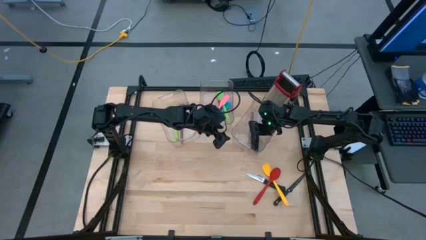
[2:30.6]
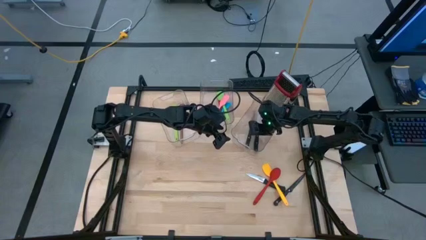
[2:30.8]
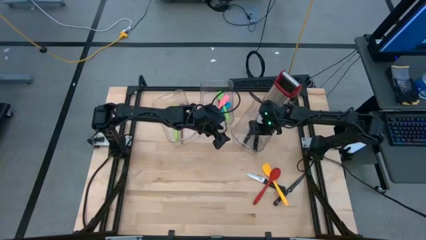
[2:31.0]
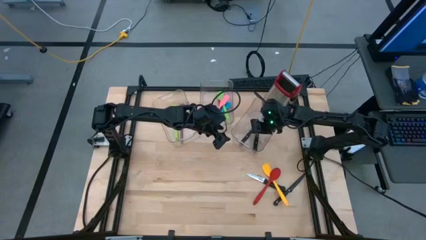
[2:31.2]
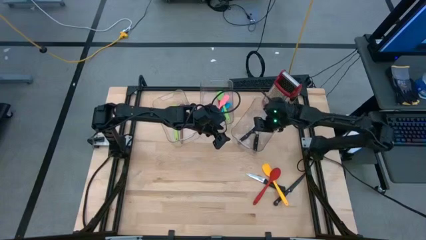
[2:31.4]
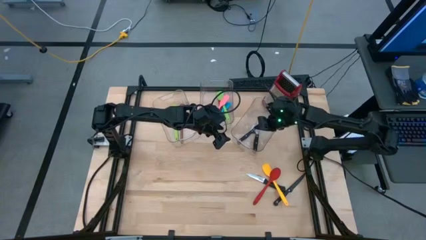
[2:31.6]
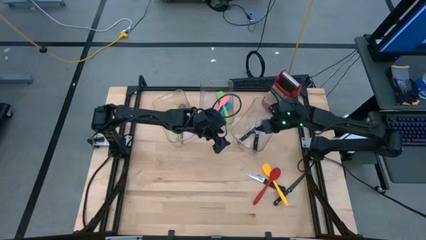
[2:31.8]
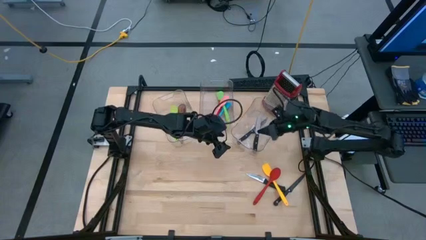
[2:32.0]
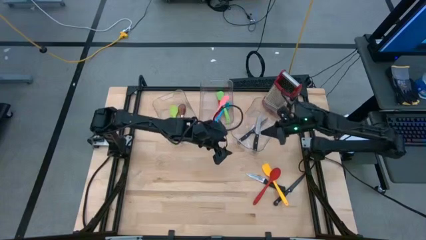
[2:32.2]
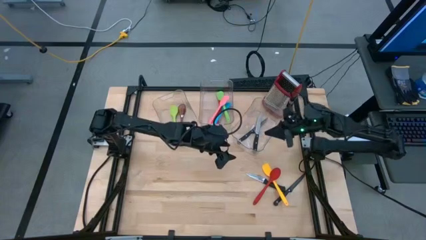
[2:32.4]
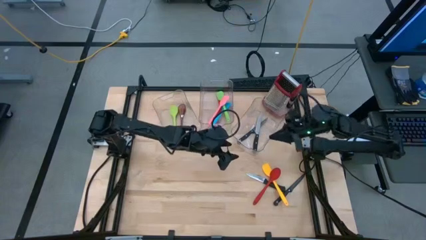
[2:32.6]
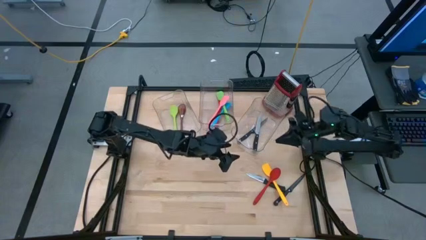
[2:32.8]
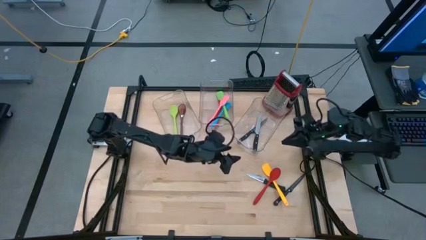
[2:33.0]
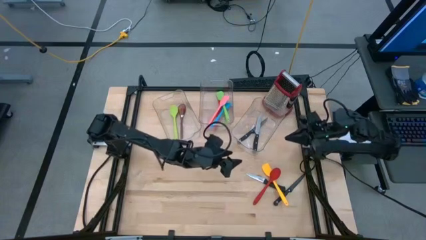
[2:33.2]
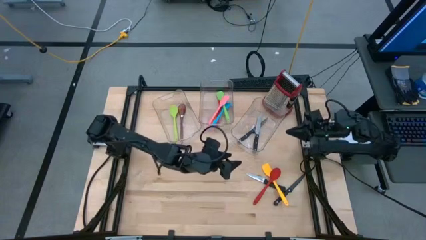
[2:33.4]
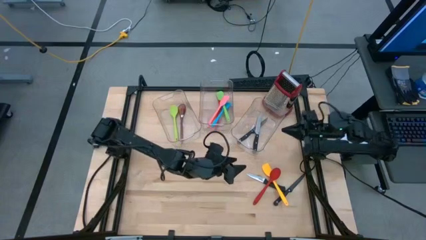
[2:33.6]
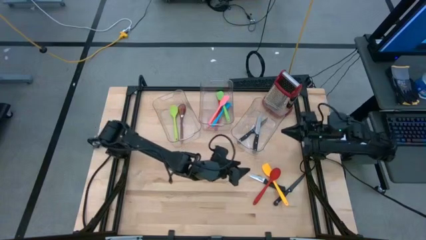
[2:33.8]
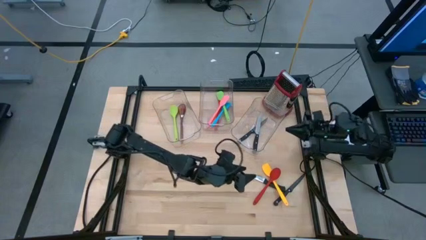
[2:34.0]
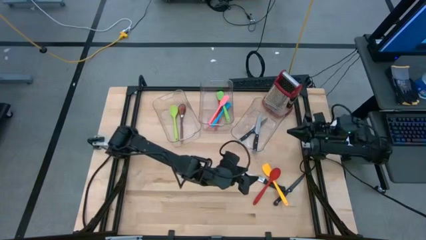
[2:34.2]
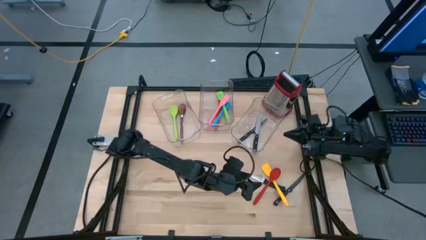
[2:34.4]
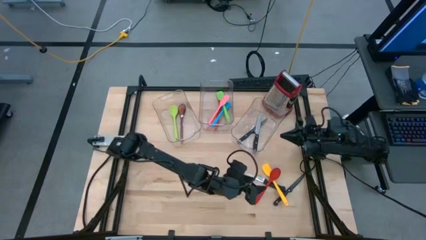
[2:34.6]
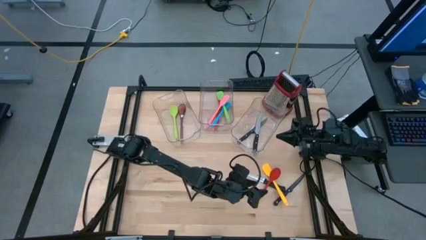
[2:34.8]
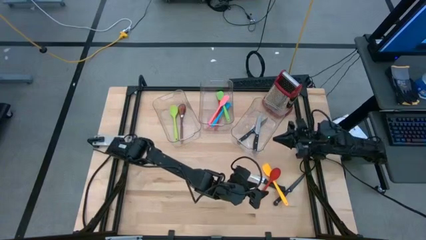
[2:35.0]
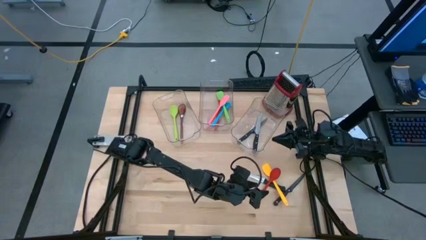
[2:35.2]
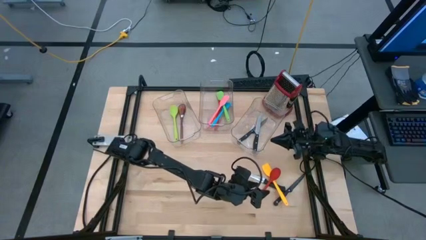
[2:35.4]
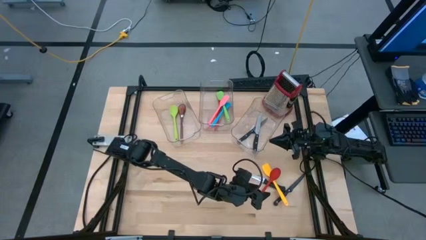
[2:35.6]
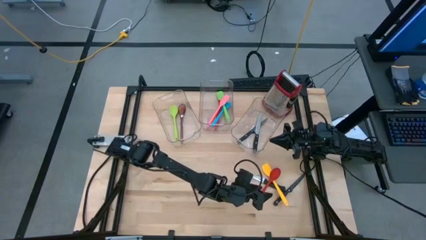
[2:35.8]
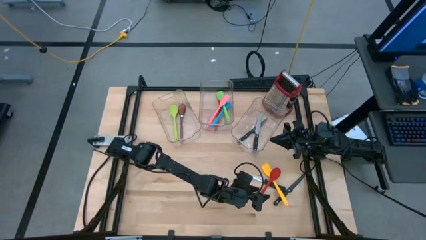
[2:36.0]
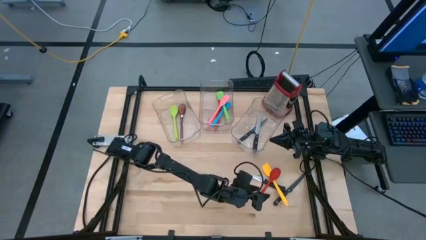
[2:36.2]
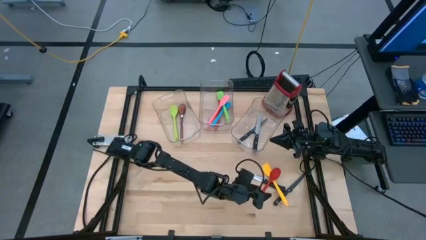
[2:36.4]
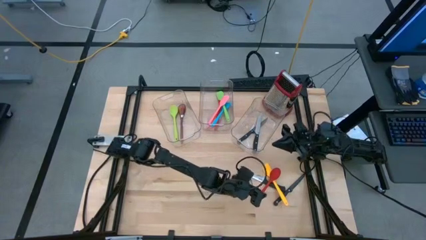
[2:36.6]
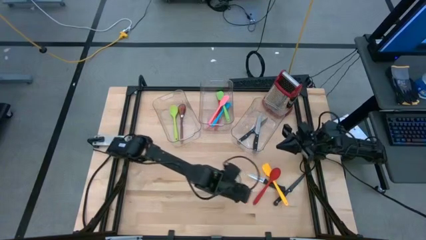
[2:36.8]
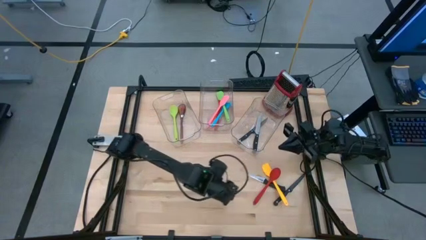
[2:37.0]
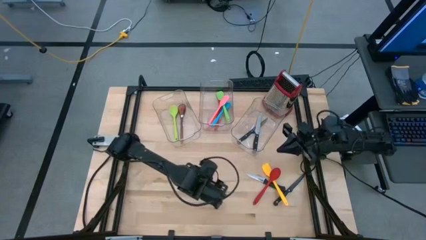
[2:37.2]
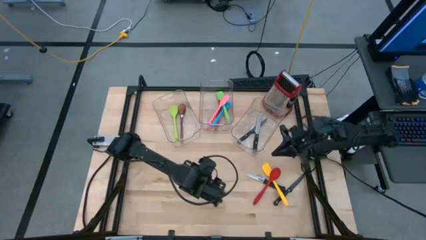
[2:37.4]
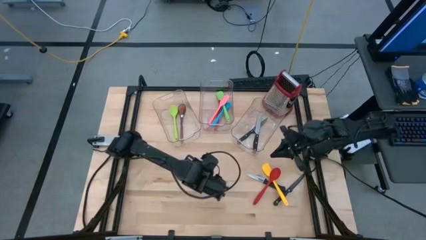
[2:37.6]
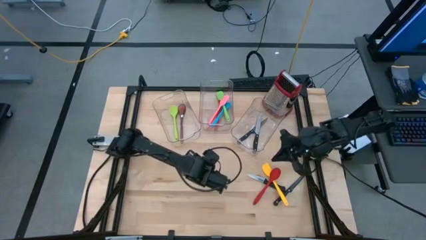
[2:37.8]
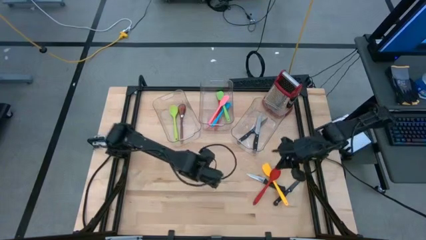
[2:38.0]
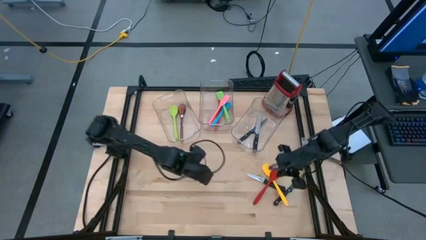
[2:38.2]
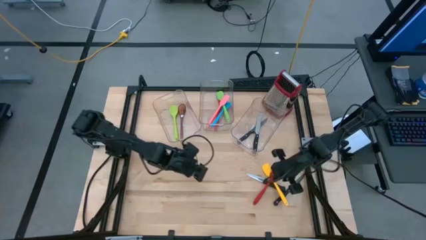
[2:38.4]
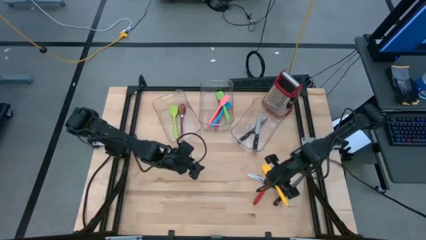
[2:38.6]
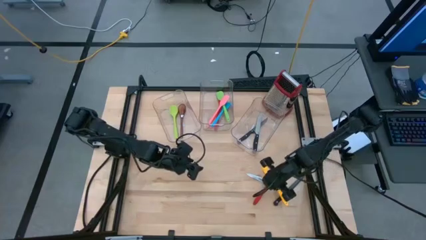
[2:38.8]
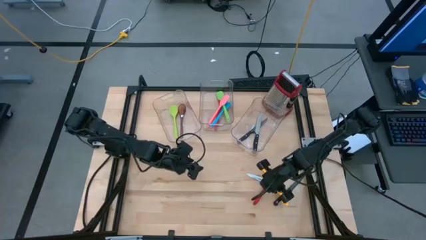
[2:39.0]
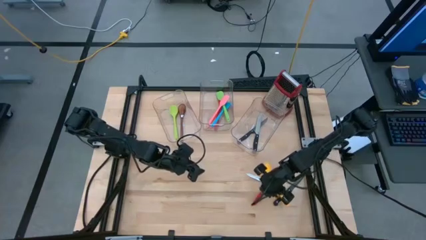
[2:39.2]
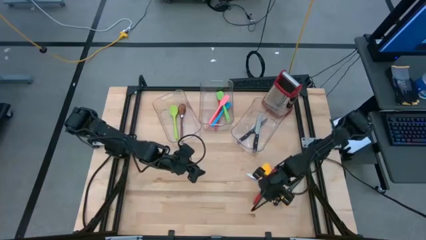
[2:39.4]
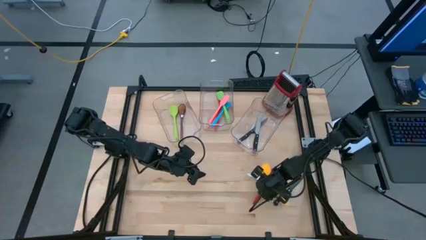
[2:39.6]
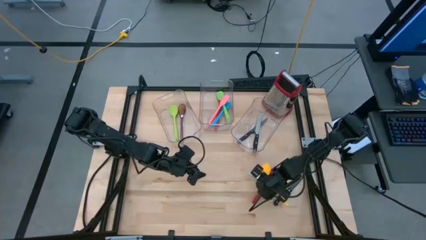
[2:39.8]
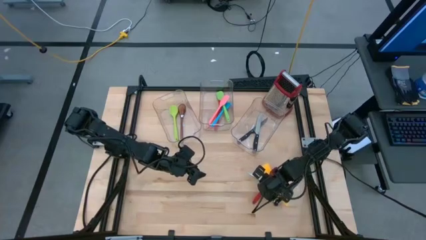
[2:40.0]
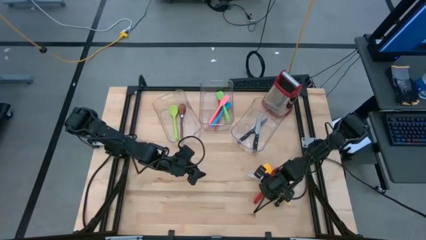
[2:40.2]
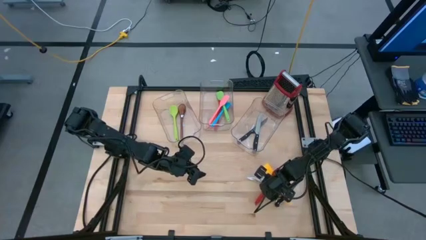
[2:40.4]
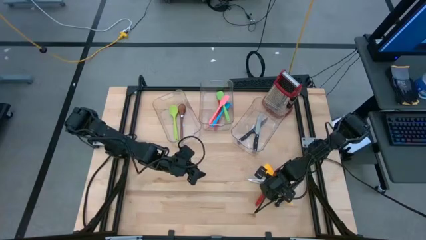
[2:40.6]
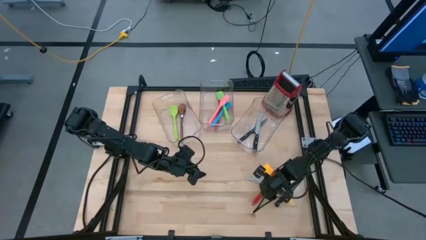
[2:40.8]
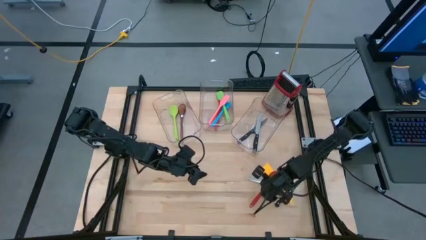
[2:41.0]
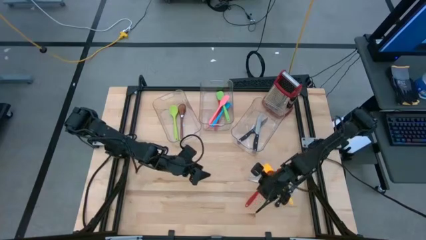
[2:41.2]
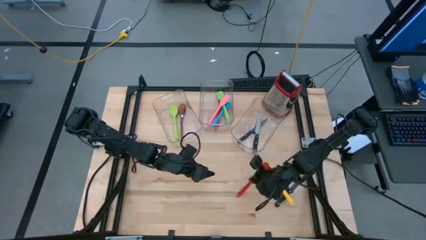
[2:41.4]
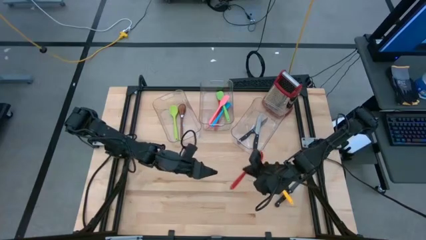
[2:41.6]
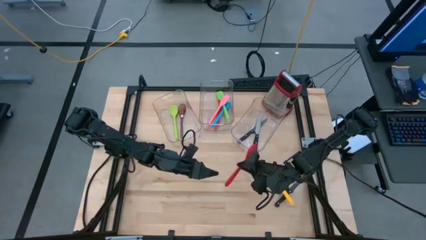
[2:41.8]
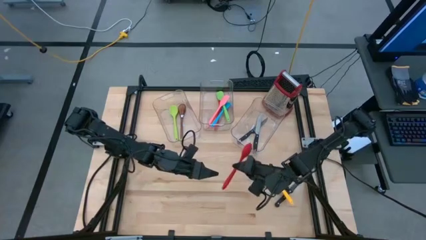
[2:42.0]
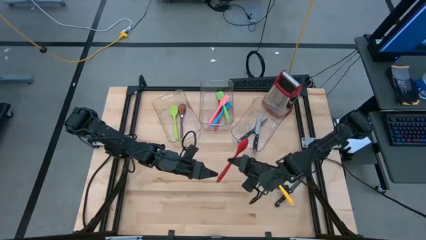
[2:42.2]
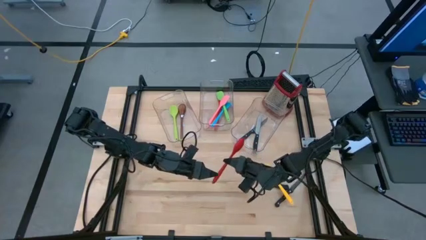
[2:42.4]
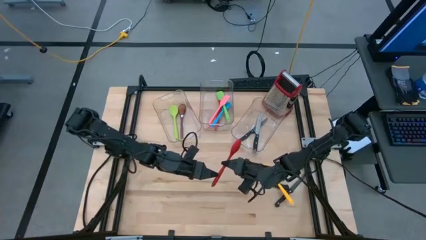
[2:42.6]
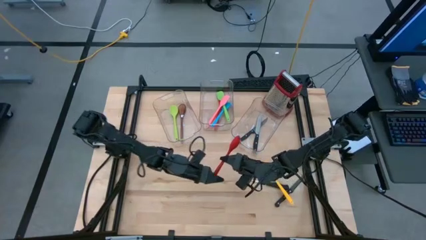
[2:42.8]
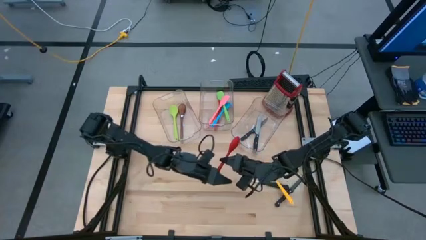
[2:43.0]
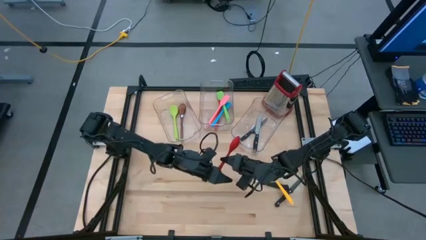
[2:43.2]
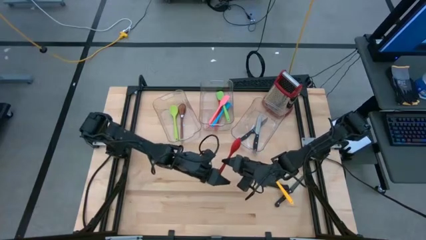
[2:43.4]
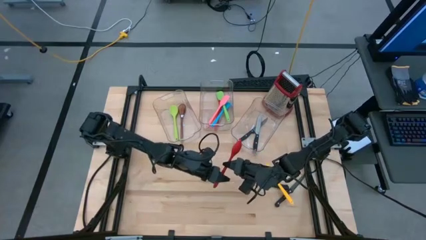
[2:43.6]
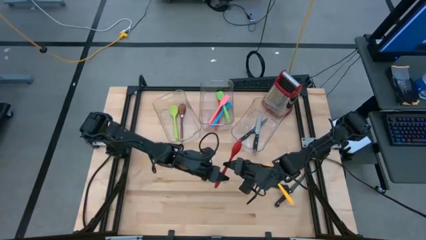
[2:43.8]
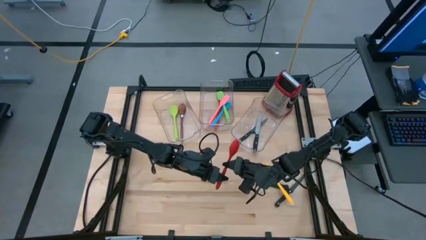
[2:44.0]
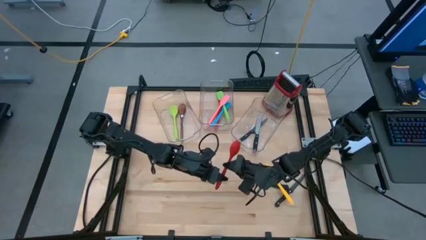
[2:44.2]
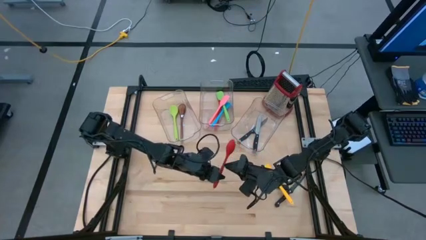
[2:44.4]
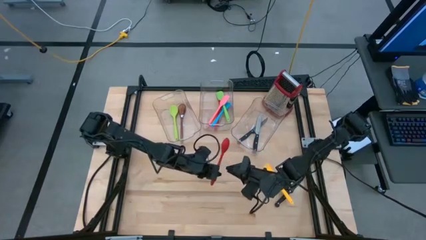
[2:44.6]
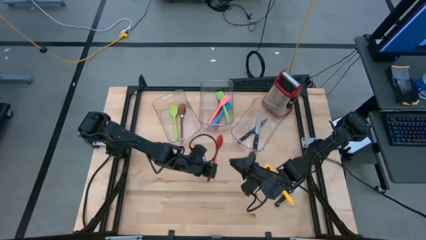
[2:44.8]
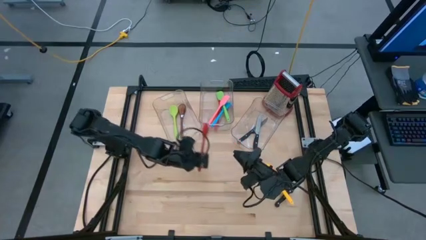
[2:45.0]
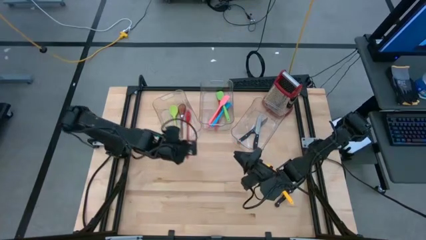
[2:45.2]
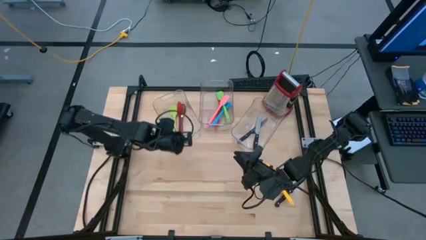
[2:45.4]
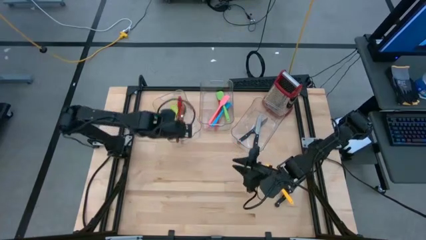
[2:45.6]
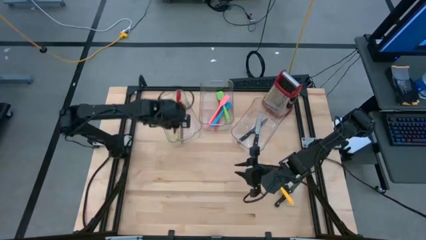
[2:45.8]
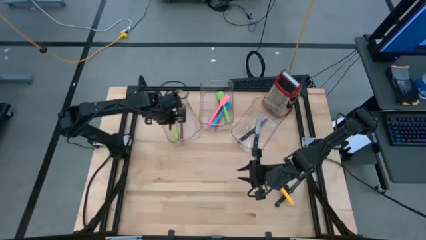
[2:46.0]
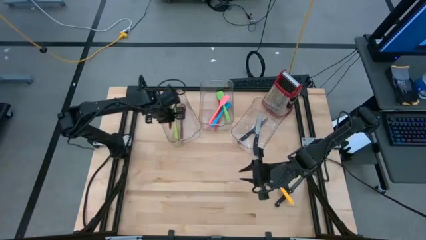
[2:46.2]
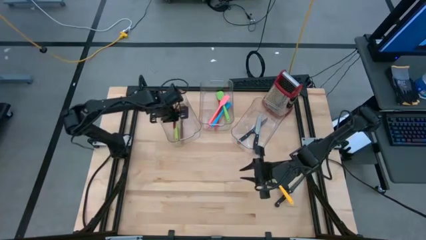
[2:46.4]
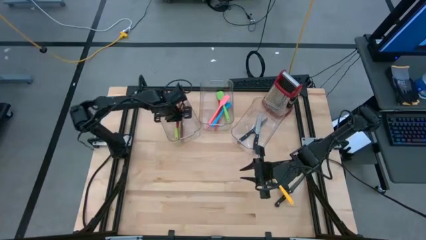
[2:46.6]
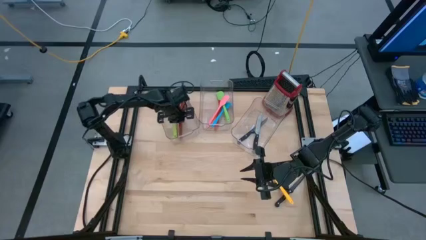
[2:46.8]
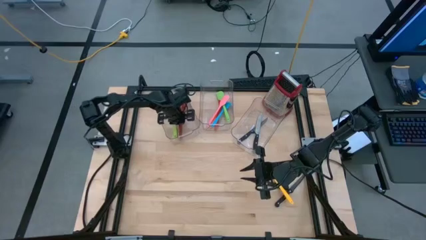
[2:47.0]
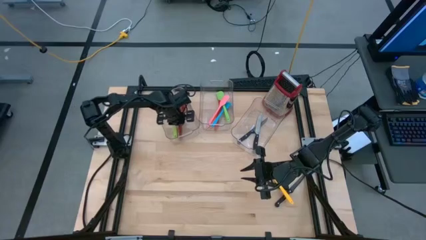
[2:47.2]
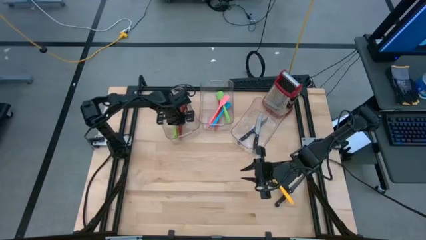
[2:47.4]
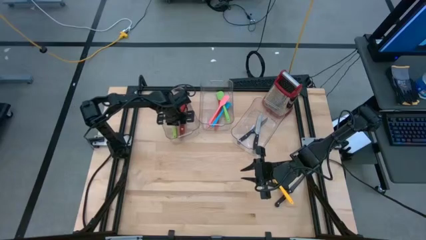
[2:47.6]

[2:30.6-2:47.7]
Task: Pick & Place Kitchen Items
Put the red serving spoon in the left bin
